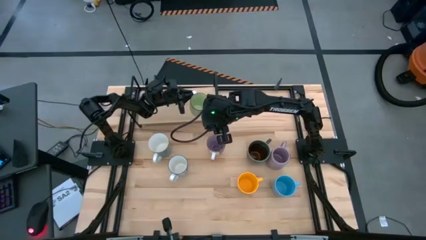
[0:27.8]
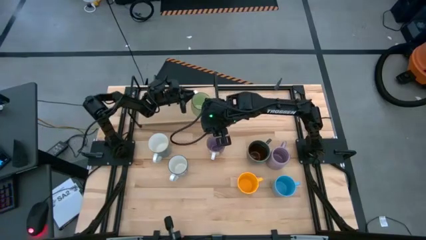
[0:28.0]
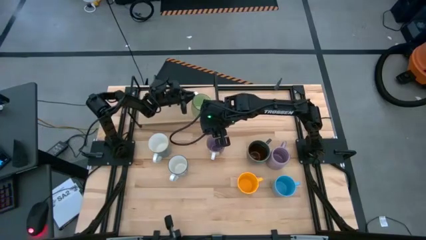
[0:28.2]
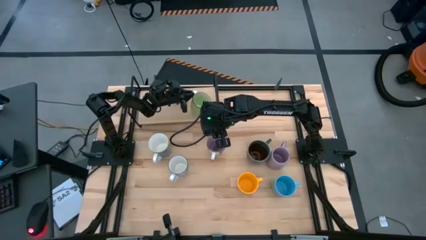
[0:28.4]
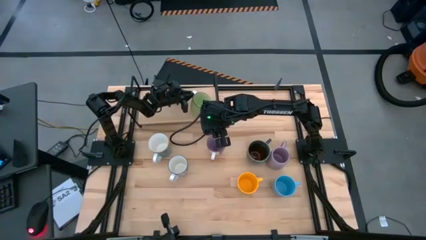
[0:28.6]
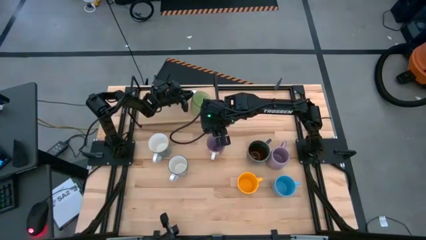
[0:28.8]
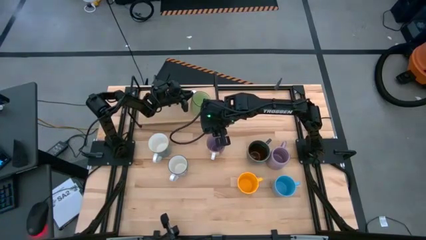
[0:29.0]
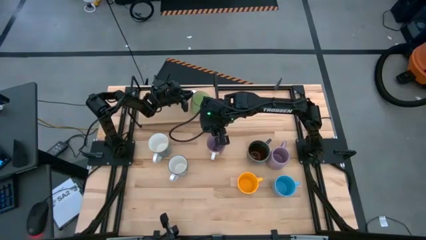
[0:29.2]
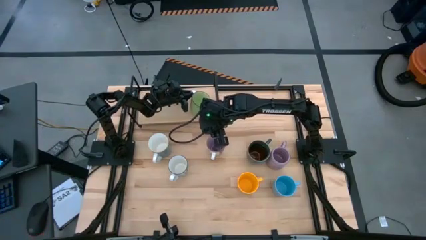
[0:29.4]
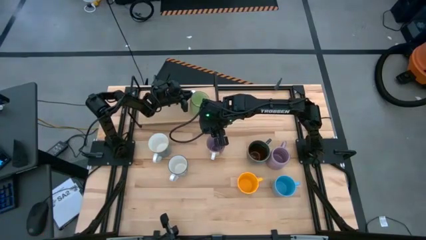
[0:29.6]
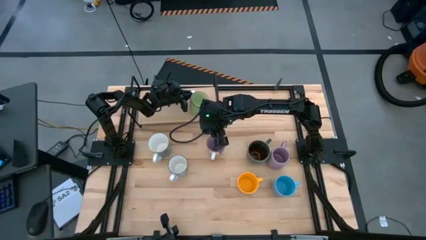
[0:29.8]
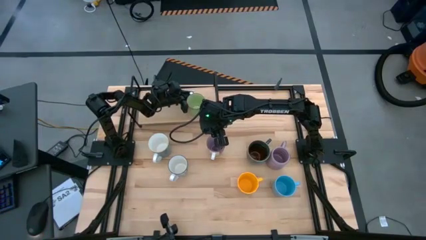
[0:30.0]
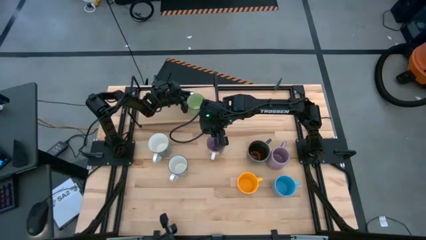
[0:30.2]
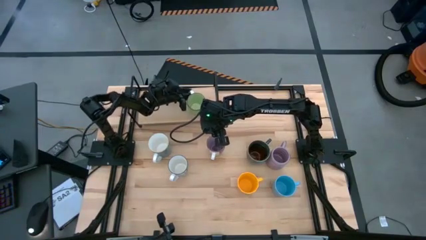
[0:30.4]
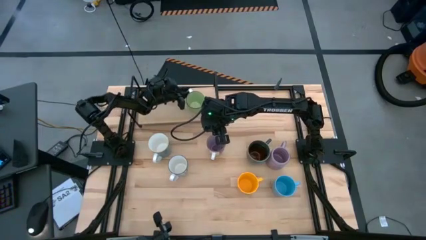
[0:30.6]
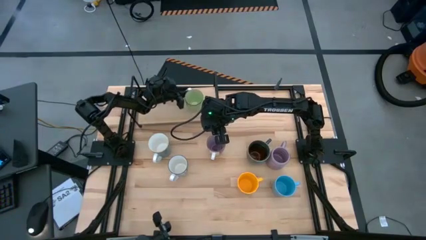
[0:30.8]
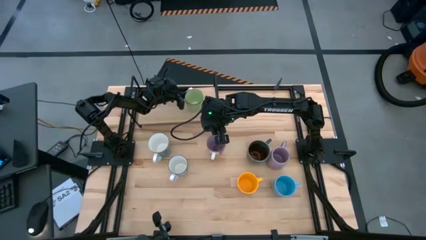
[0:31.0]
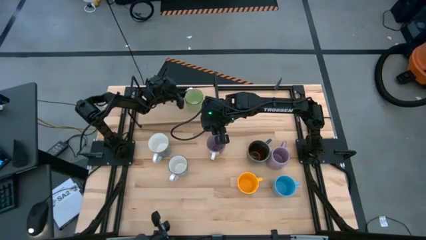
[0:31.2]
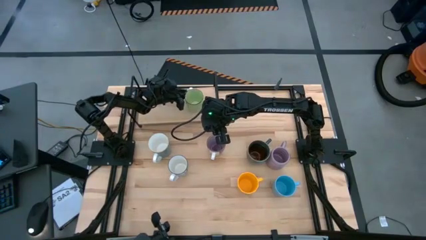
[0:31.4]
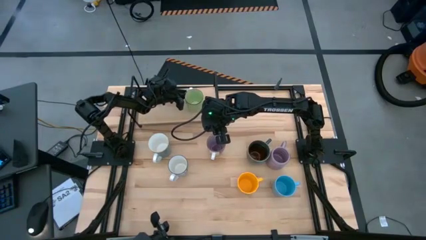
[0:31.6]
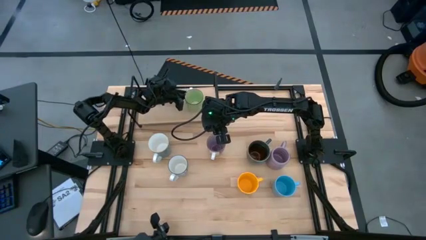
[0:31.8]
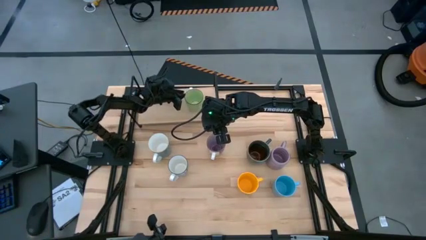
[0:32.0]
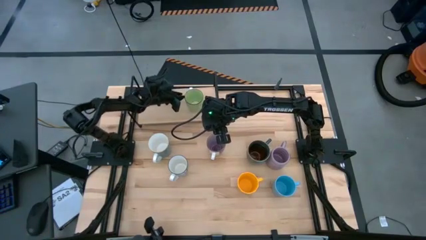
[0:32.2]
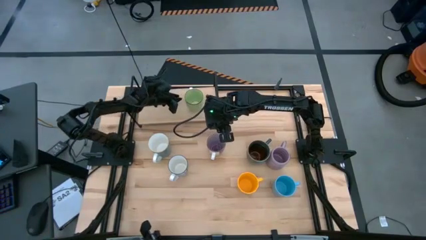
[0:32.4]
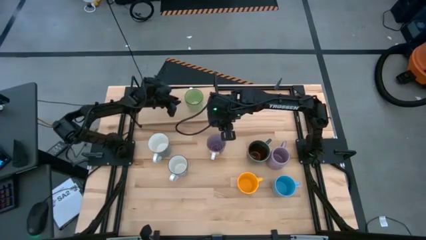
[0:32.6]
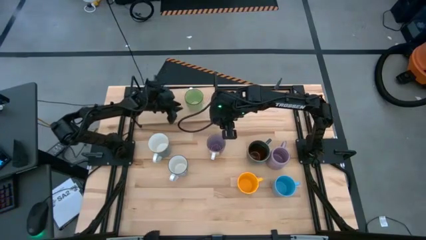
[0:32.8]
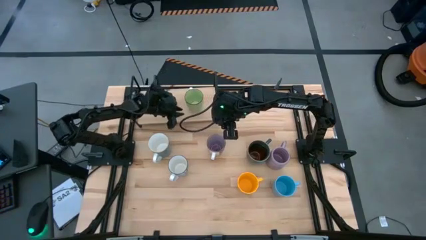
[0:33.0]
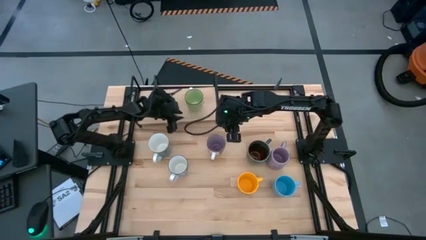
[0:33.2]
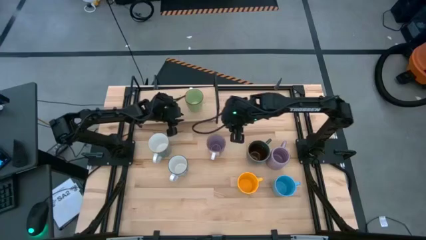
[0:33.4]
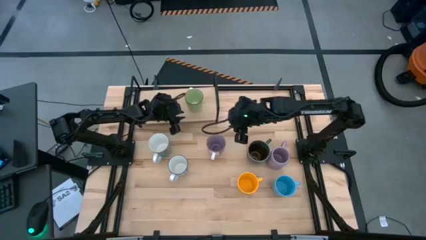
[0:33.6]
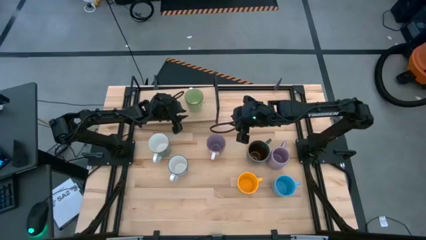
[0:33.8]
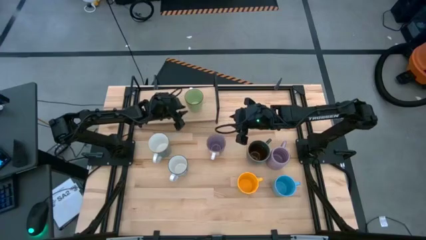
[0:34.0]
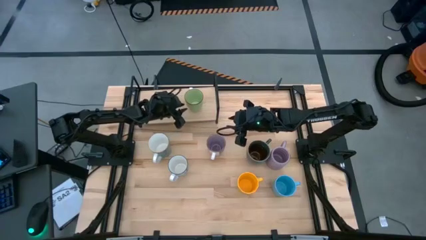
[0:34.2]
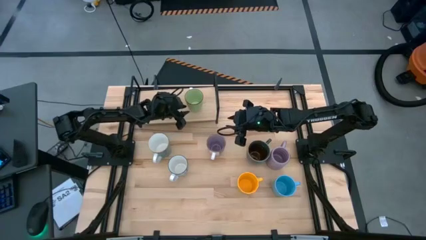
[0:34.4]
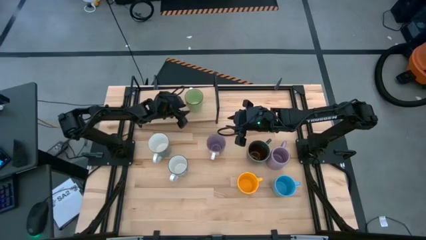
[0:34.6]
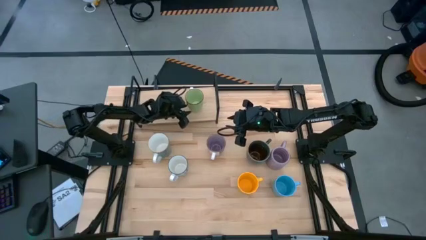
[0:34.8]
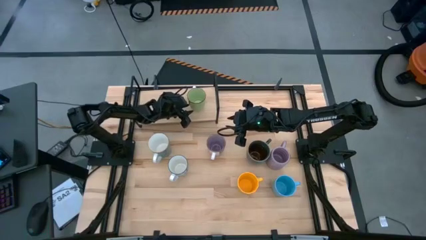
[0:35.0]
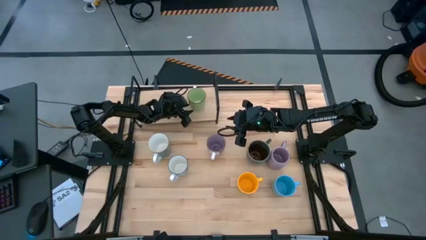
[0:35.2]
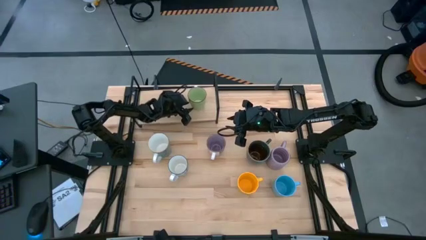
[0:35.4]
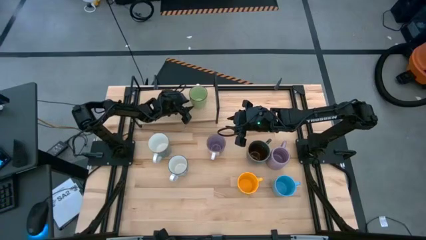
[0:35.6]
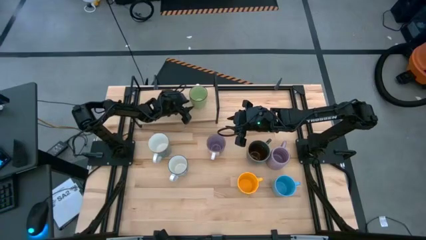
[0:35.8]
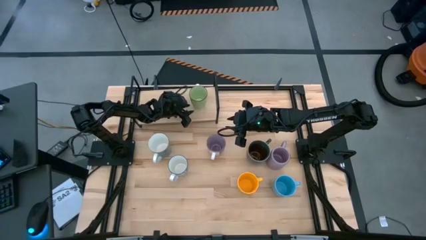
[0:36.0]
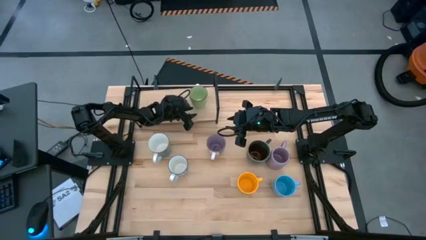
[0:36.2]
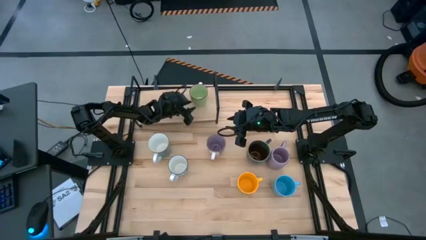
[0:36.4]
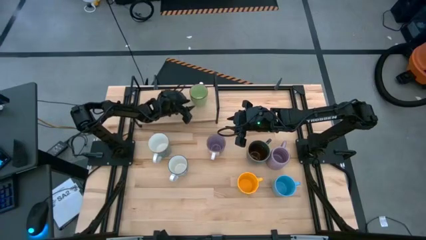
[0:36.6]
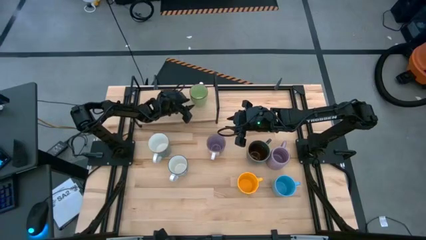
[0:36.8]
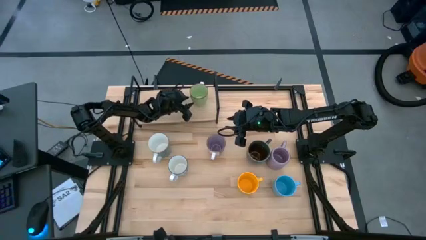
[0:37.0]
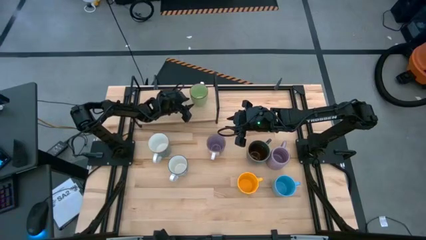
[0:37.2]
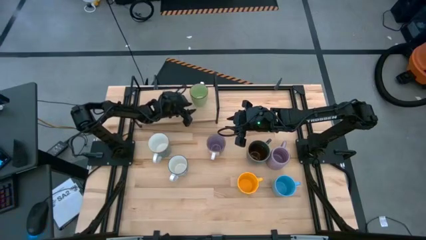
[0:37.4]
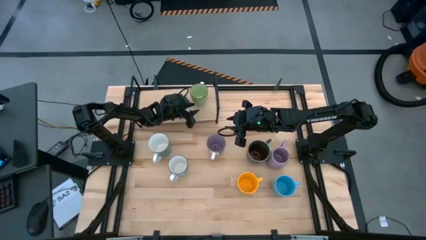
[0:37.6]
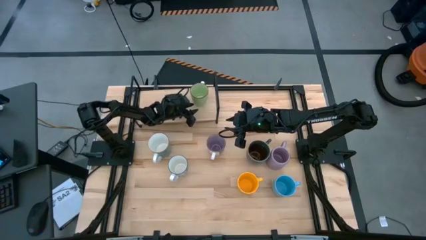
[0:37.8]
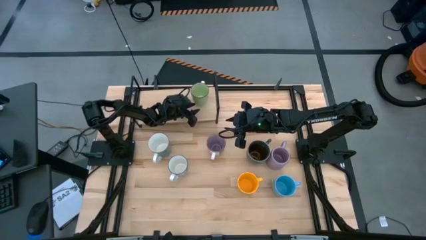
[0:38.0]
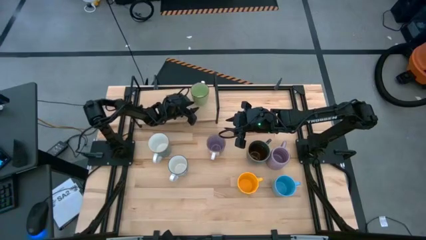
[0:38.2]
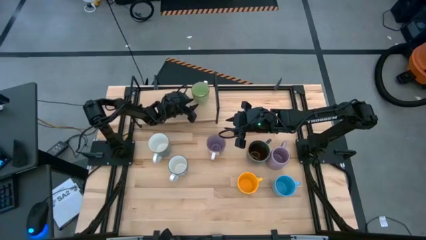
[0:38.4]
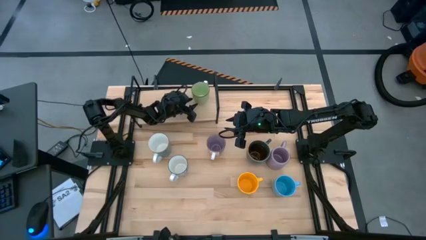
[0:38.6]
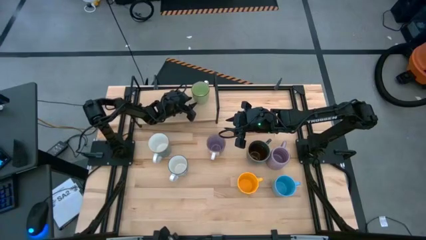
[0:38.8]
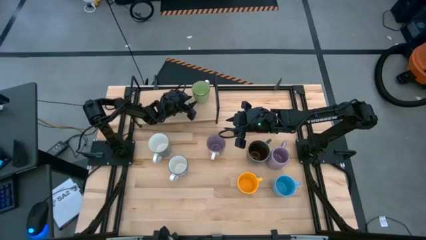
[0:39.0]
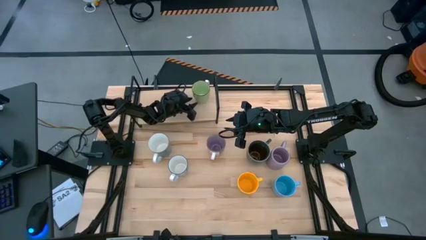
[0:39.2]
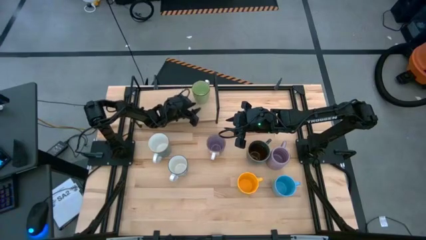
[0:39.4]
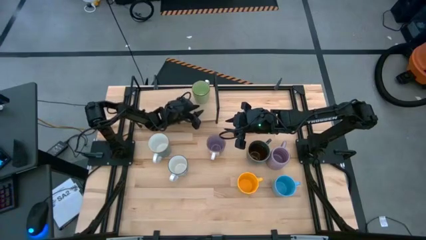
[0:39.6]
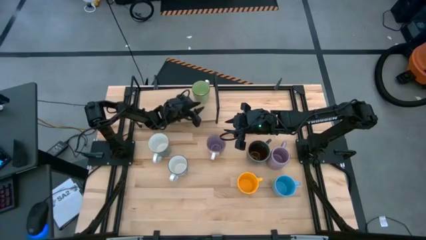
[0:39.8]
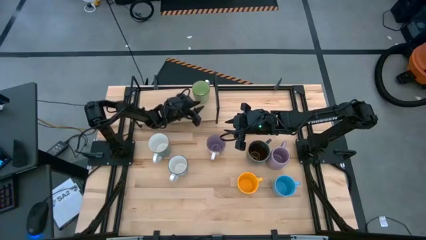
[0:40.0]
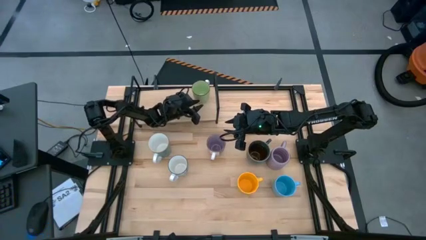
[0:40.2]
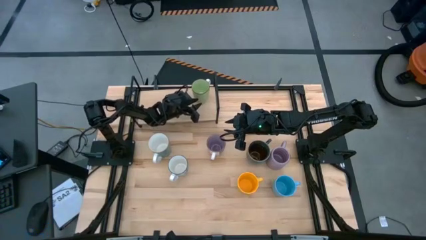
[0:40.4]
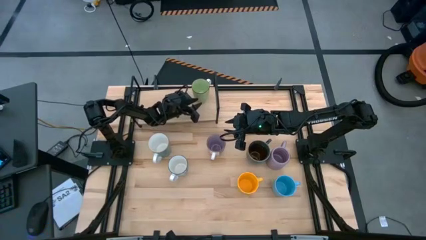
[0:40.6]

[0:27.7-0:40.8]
Task: Place coffee mugs
Put the green patterned mug on the shelf

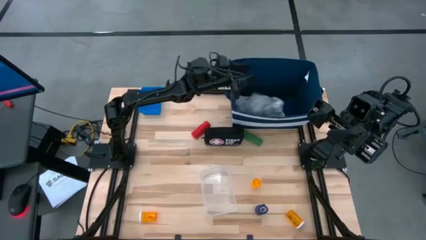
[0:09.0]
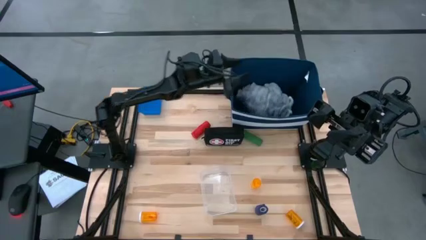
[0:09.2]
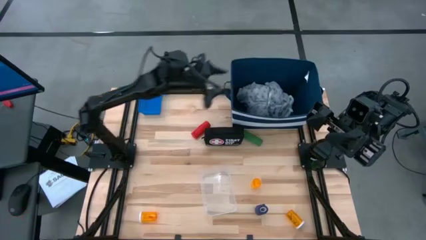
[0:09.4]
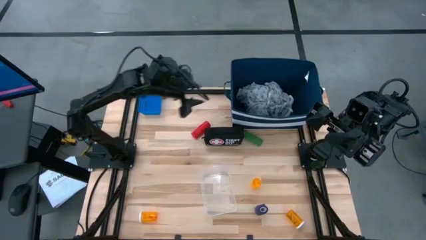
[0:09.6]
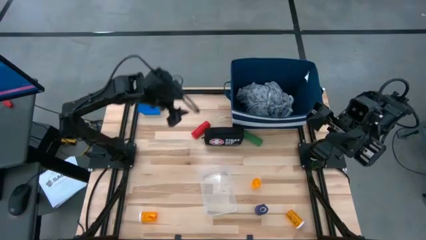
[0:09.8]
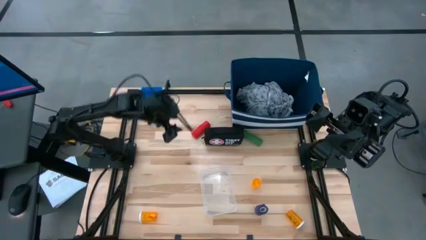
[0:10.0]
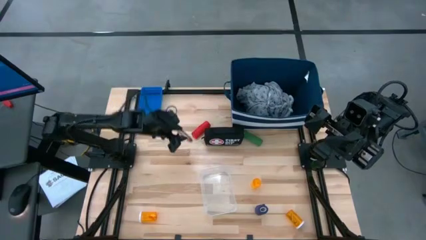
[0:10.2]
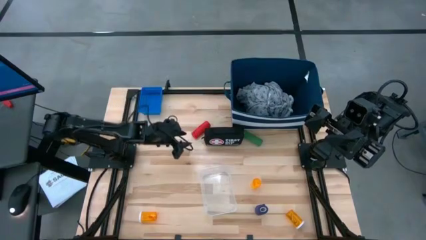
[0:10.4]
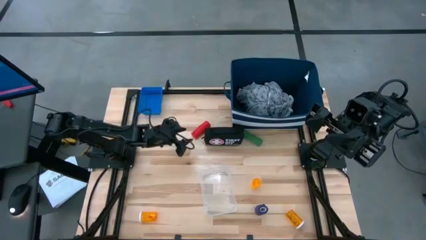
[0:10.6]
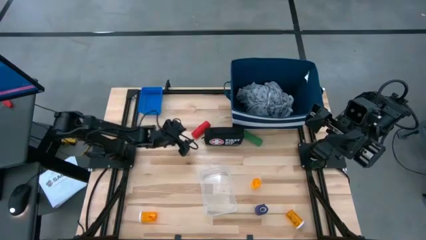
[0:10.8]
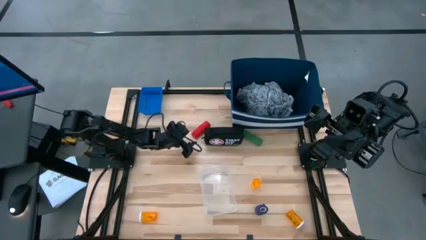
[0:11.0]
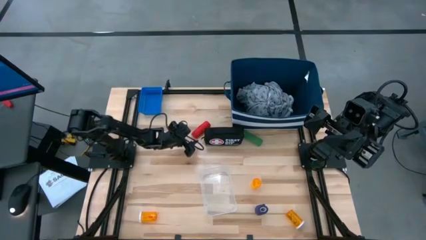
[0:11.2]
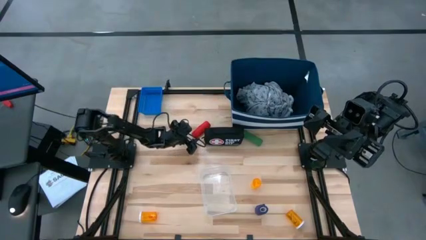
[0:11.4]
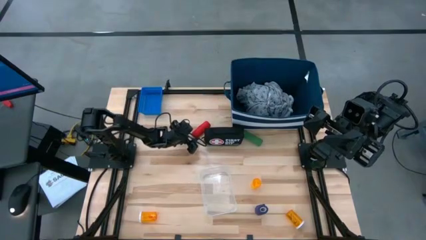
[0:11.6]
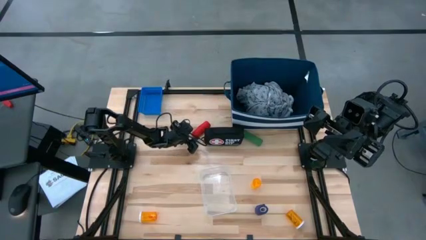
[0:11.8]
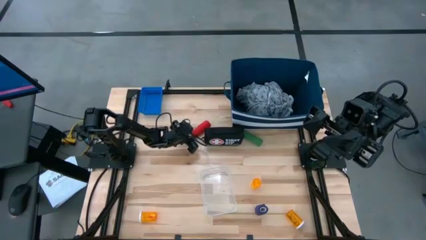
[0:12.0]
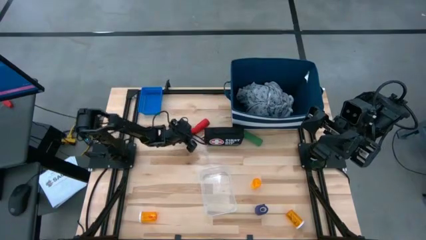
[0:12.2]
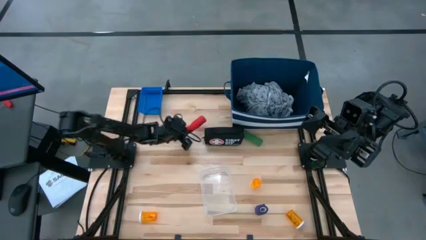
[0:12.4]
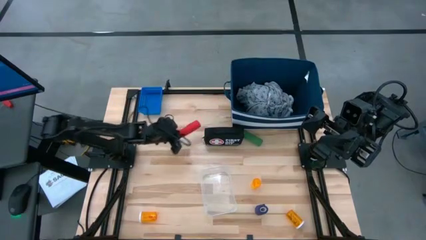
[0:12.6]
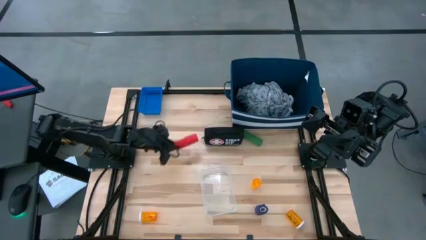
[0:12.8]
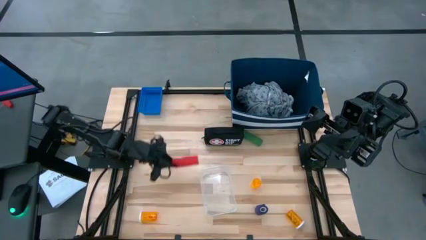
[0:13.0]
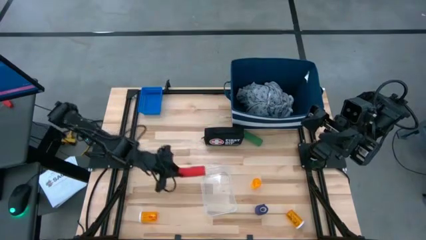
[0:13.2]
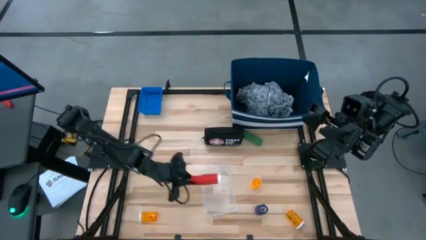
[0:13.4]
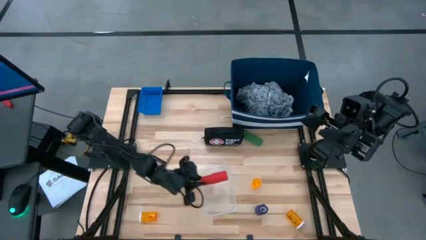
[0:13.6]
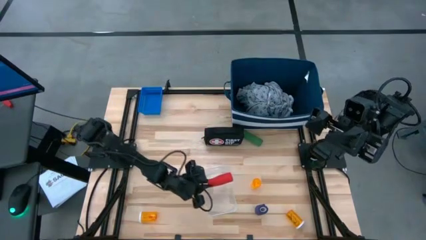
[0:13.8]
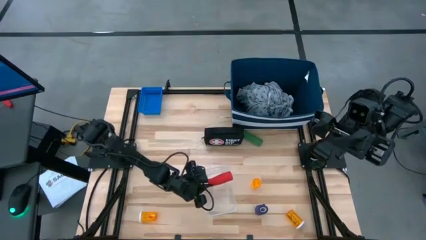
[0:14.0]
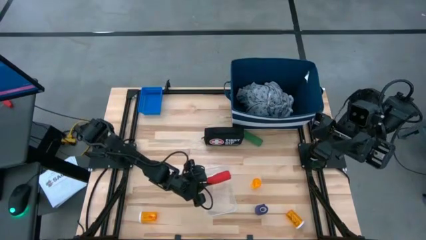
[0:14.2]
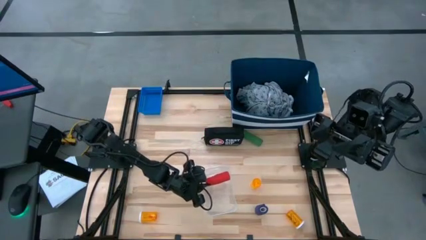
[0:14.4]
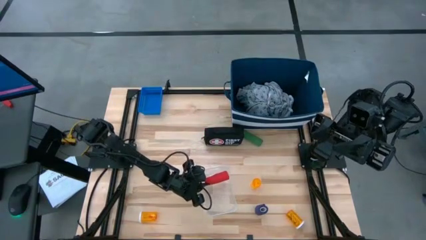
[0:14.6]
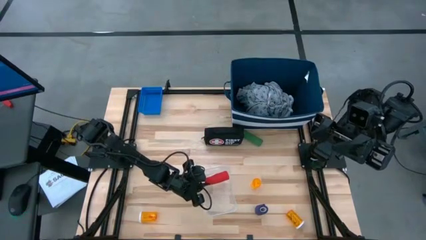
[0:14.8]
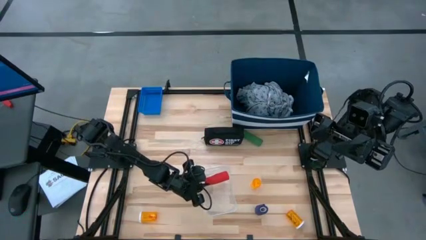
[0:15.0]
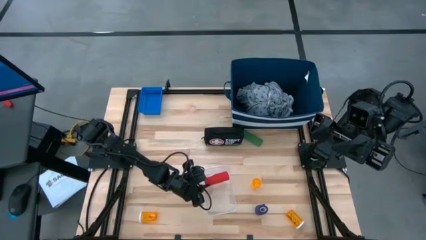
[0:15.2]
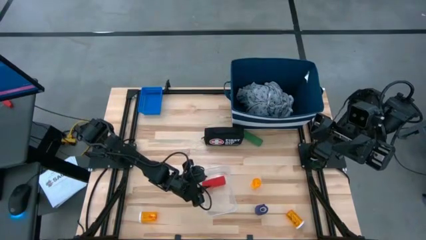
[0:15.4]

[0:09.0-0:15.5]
Task: Pick & place medical supplies in basket/bin
Put the red bandage into the transparent bin
